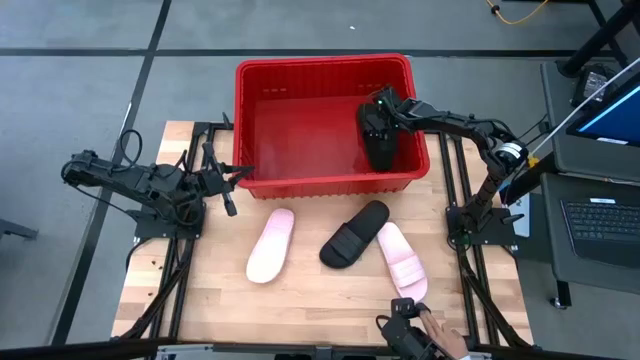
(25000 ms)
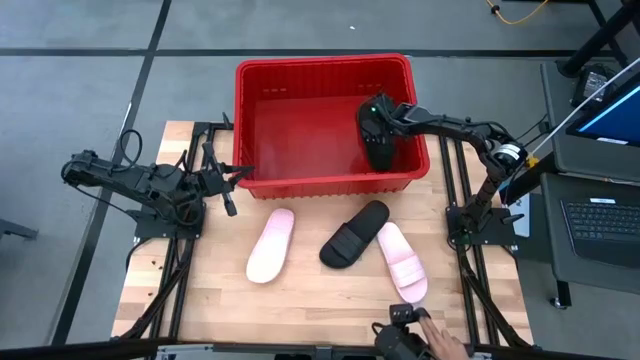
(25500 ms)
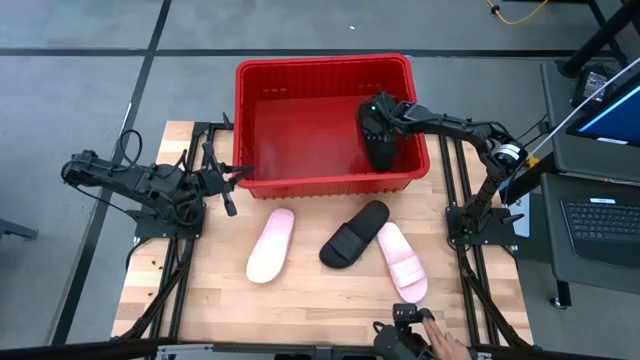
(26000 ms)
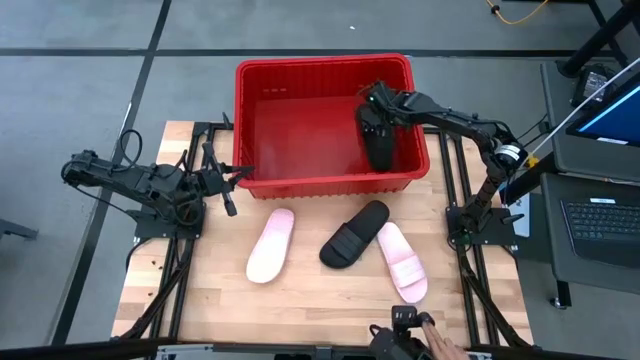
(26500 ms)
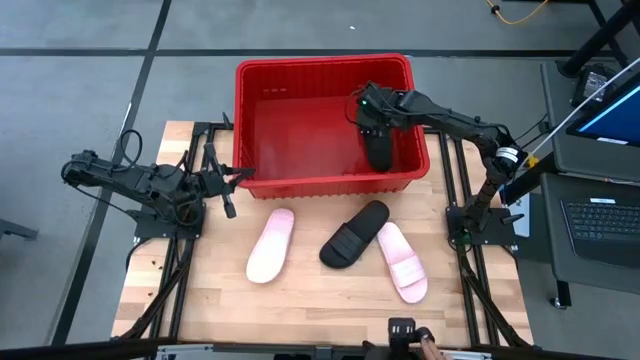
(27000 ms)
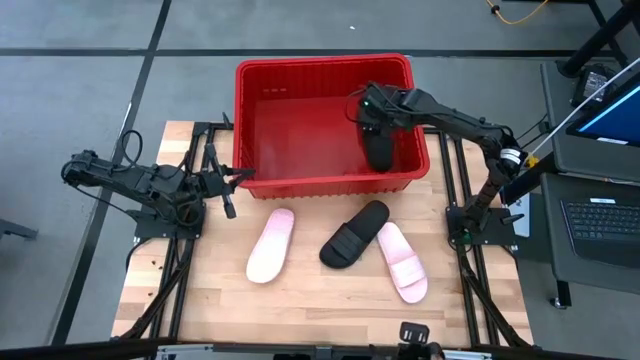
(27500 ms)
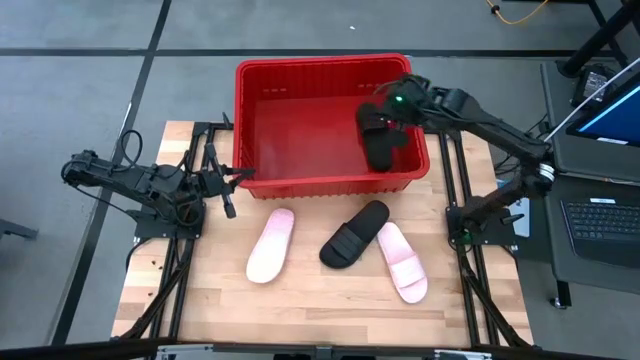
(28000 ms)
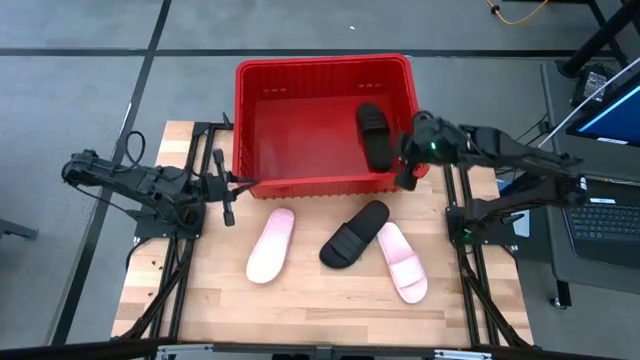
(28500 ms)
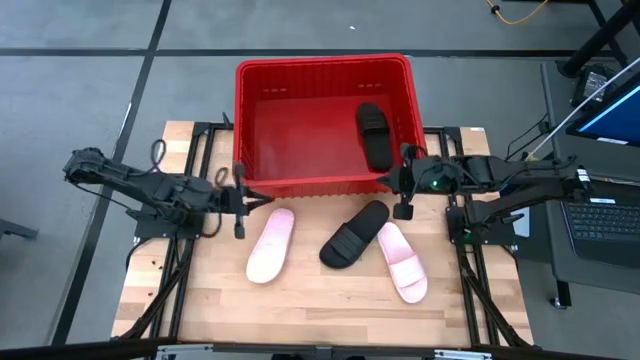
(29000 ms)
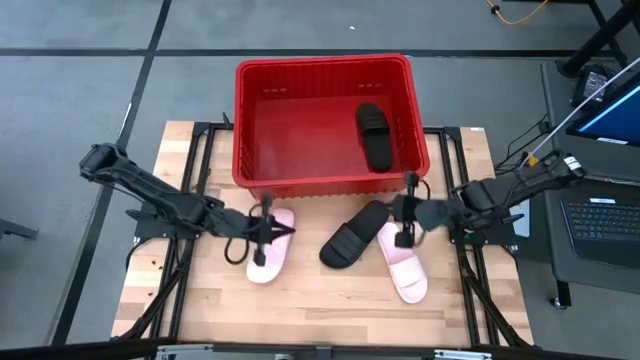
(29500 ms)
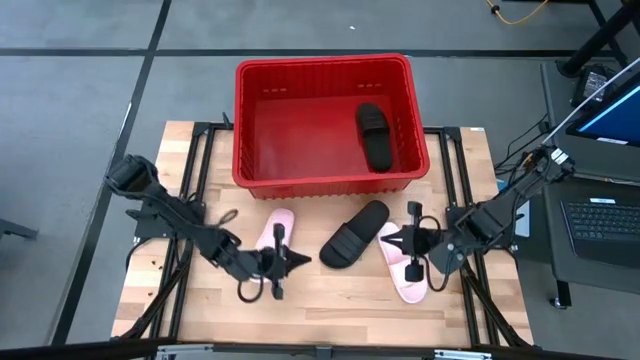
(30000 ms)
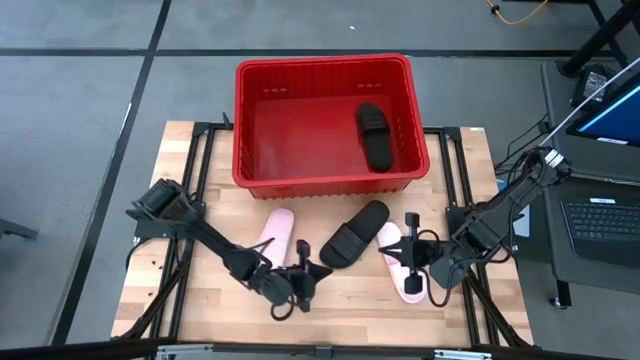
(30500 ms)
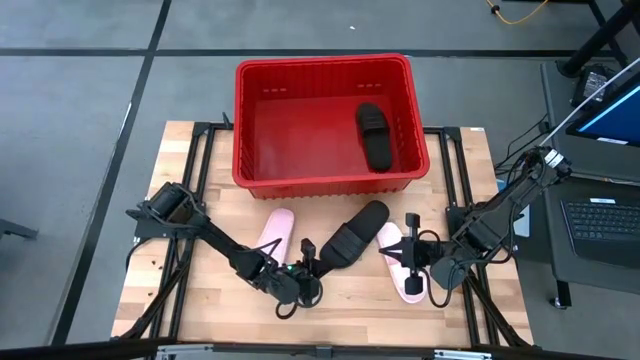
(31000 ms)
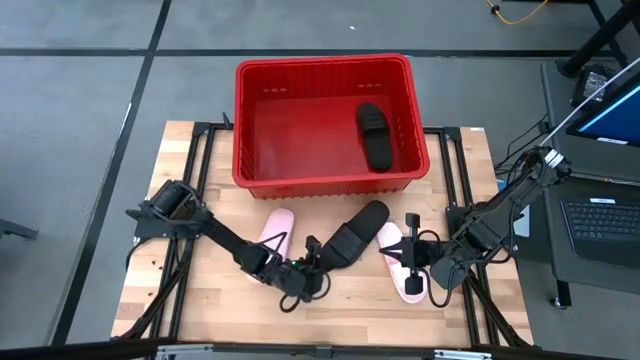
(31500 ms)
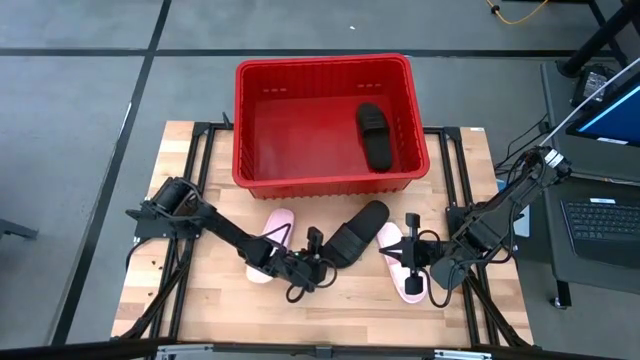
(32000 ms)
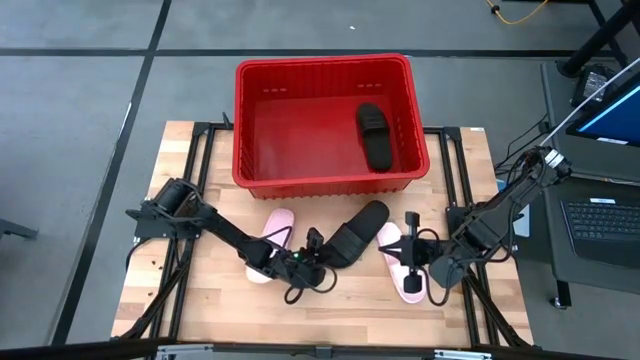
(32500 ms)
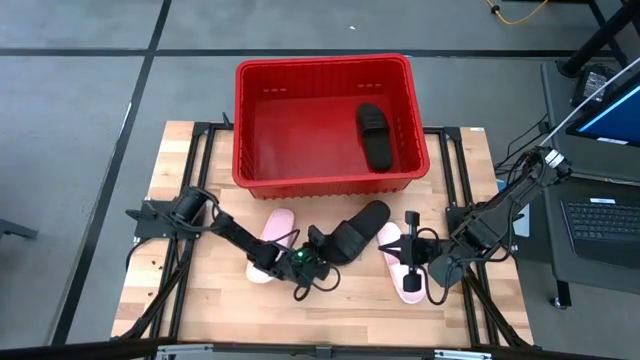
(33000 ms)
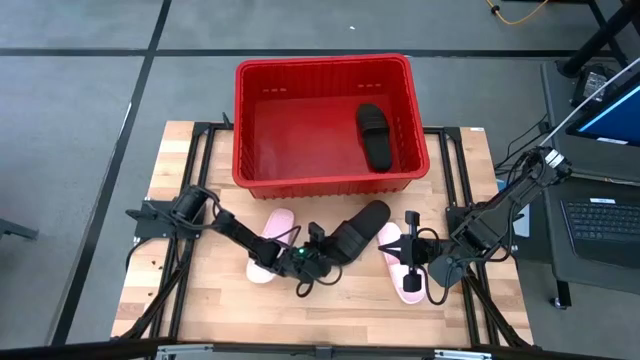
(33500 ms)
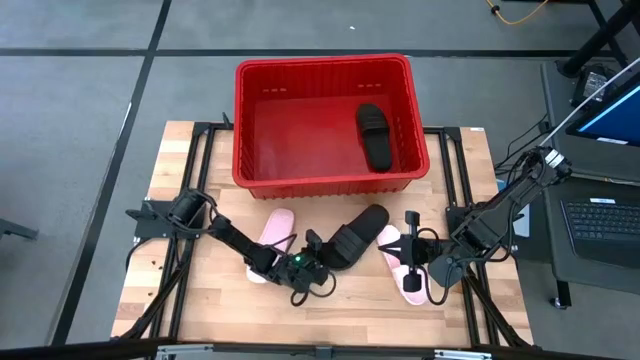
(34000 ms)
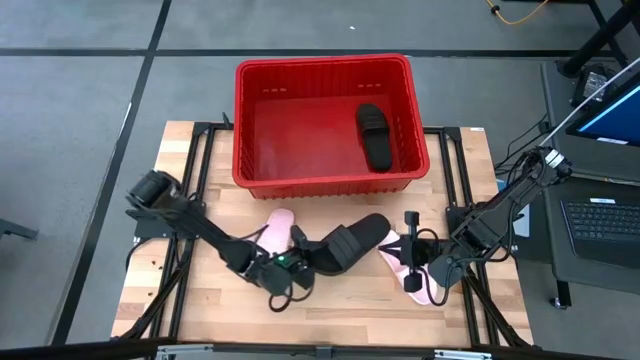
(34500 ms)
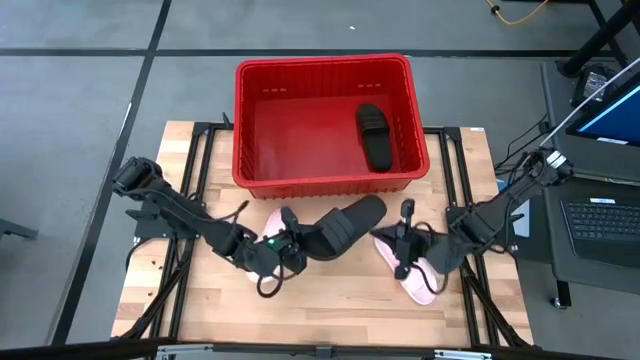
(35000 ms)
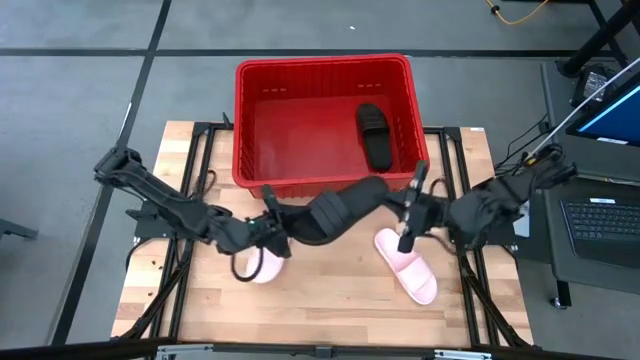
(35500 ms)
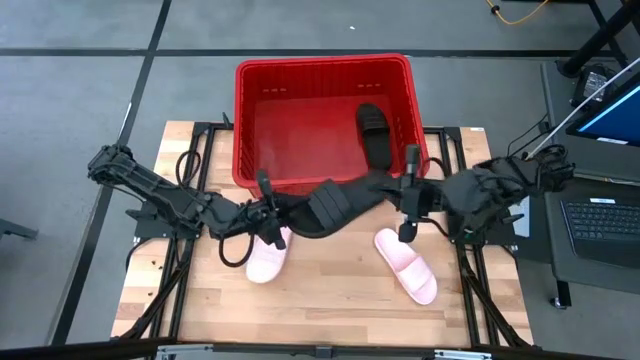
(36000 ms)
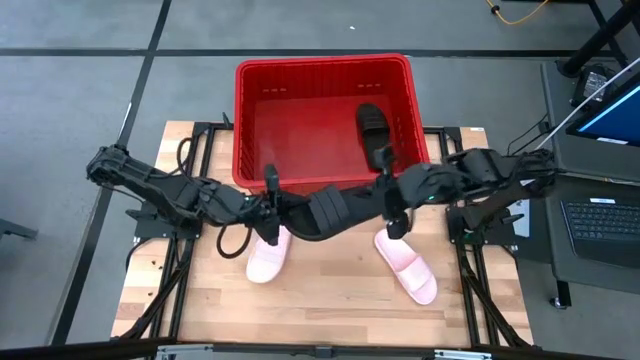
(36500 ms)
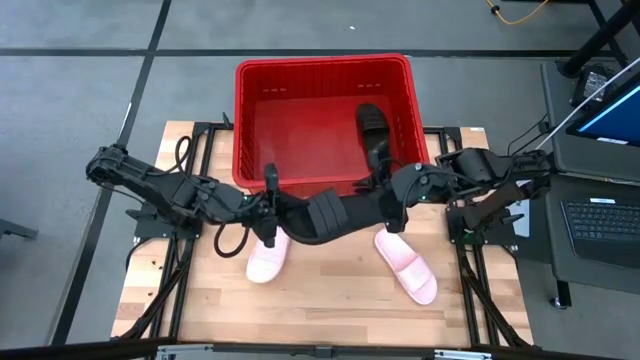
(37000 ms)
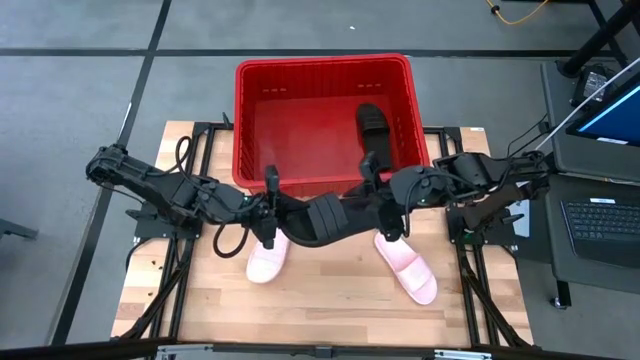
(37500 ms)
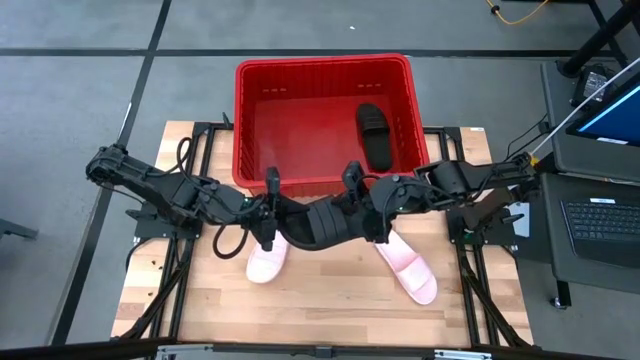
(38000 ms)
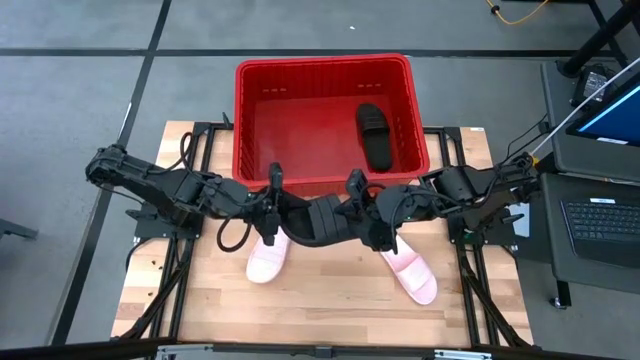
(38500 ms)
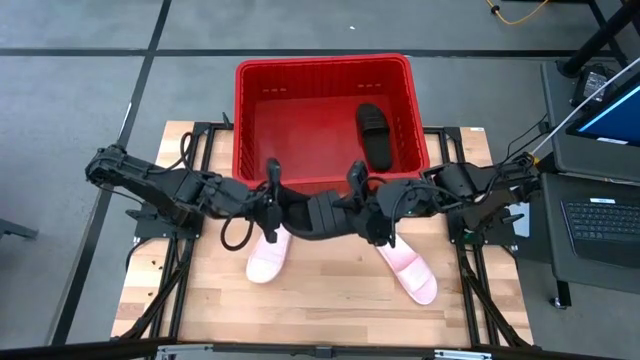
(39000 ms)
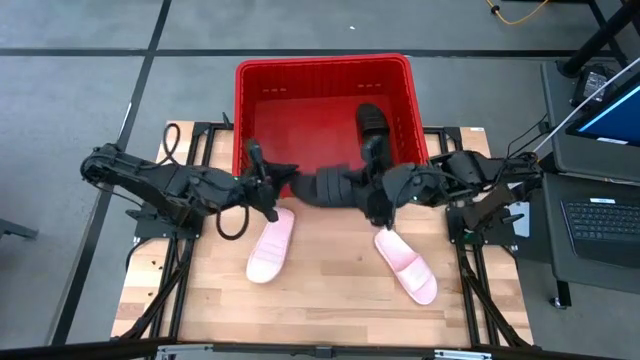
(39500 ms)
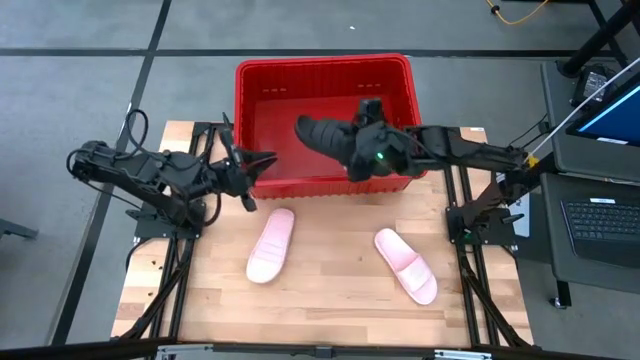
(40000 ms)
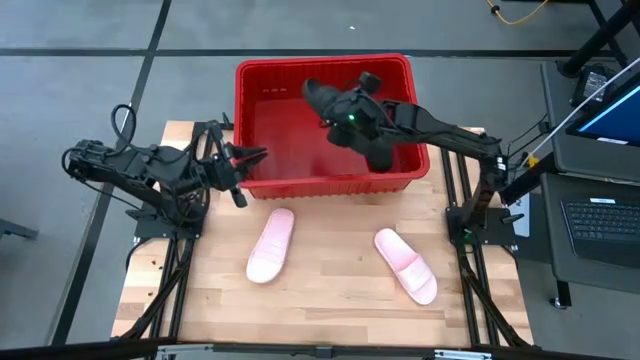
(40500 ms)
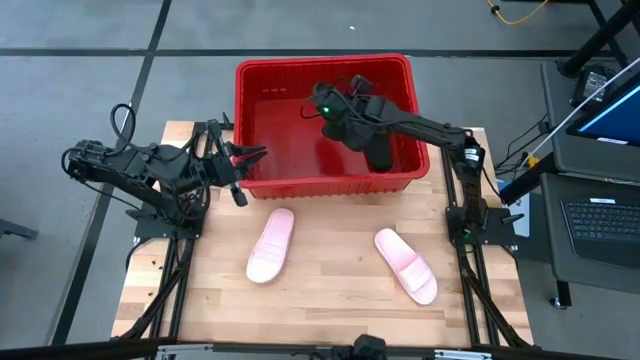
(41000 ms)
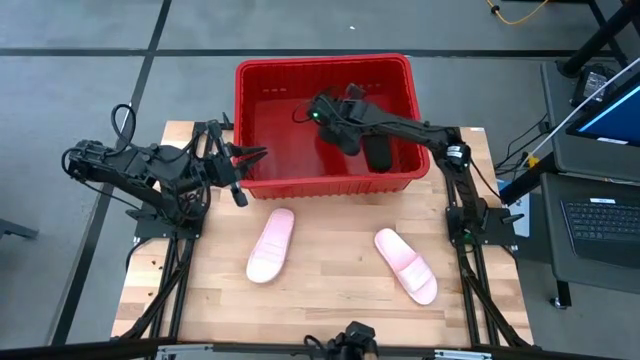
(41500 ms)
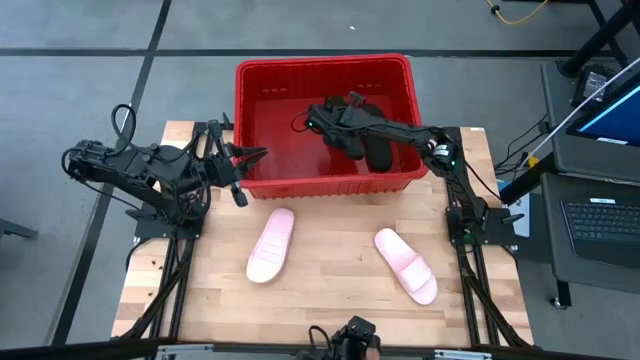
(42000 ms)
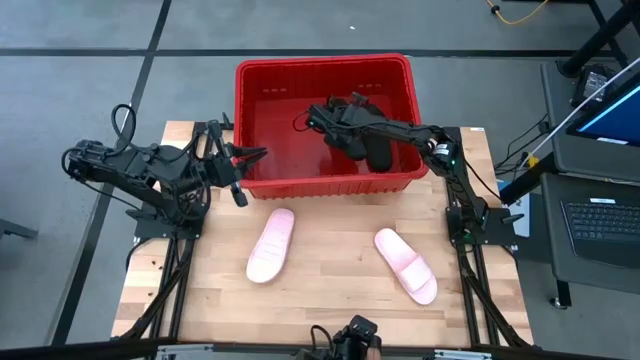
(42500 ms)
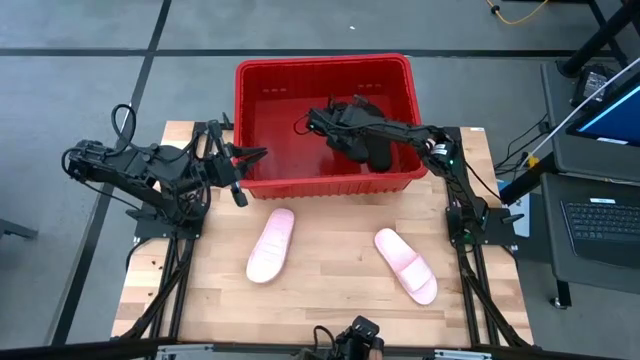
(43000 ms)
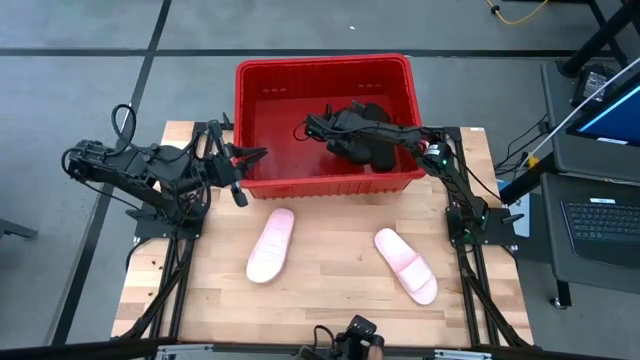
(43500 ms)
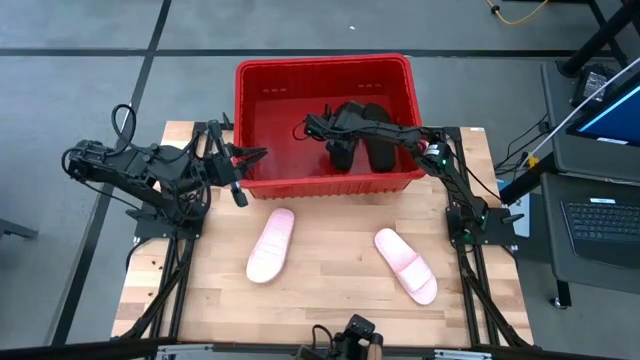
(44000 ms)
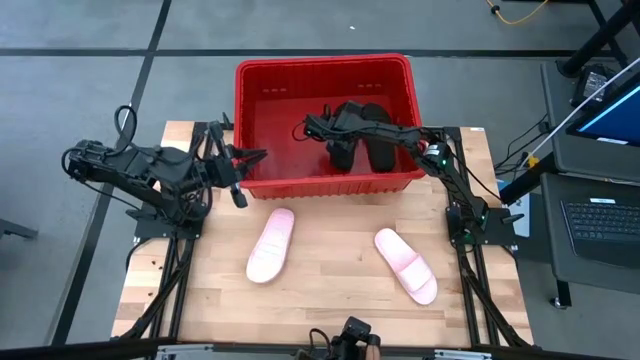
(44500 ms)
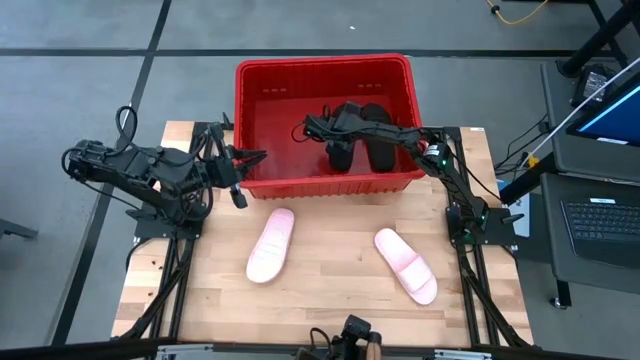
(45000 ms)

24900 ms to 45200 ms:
Task: Pick and place slides into bin
Put the black slide into the bin
